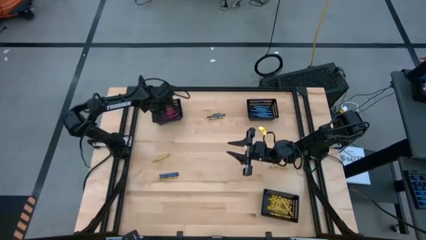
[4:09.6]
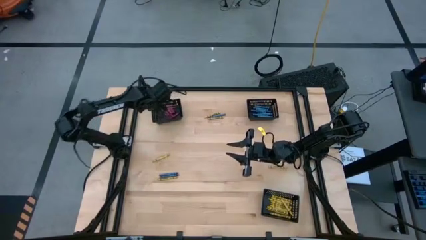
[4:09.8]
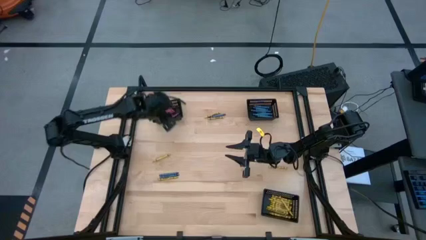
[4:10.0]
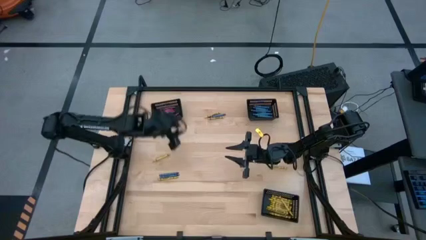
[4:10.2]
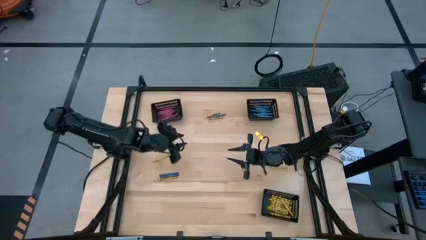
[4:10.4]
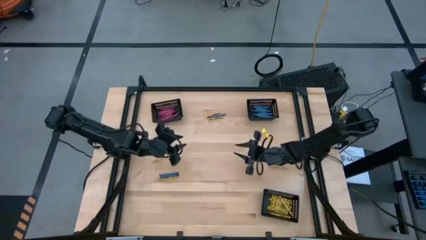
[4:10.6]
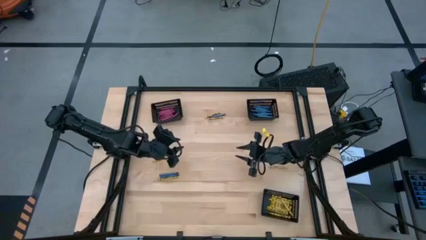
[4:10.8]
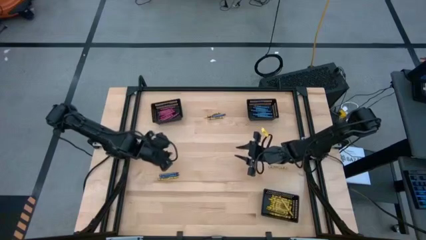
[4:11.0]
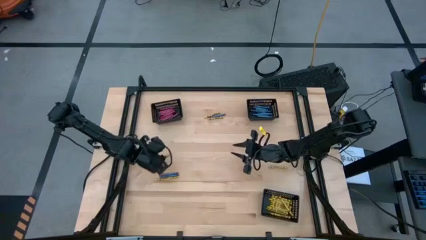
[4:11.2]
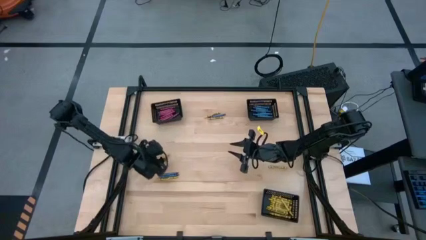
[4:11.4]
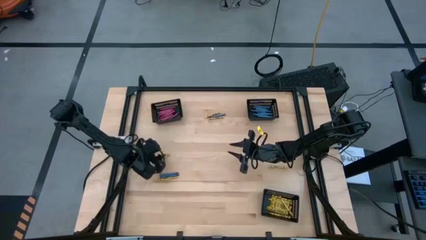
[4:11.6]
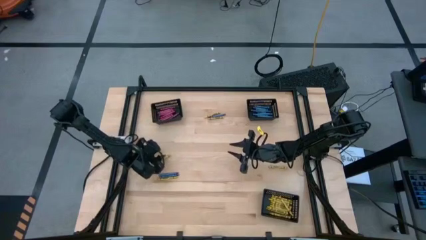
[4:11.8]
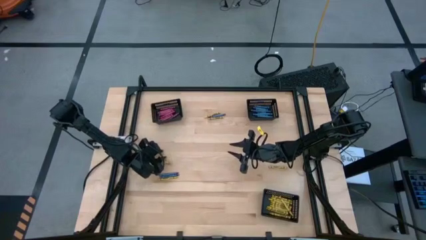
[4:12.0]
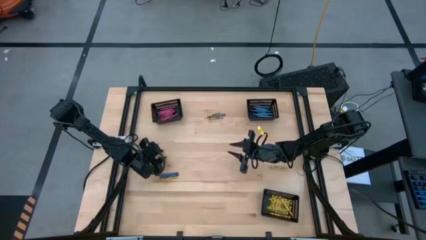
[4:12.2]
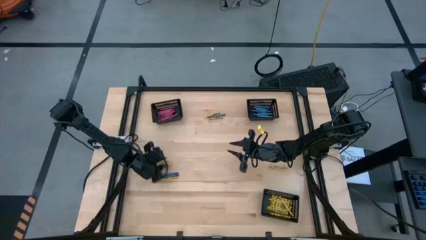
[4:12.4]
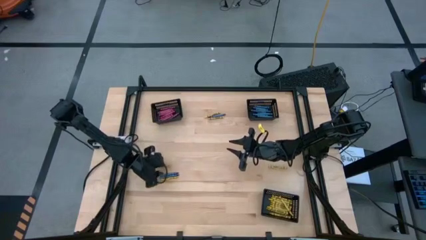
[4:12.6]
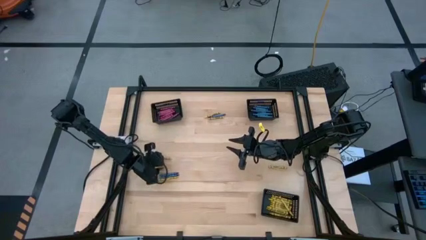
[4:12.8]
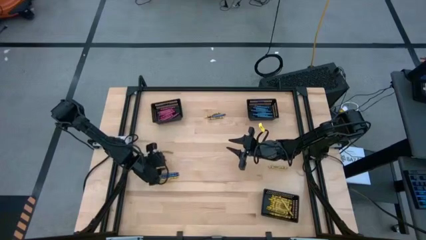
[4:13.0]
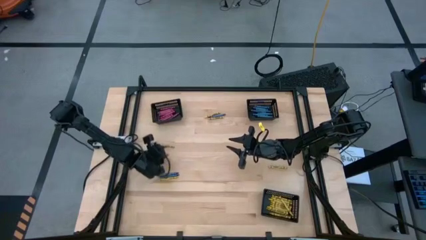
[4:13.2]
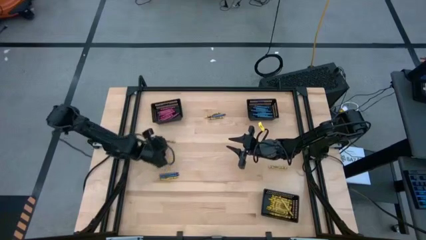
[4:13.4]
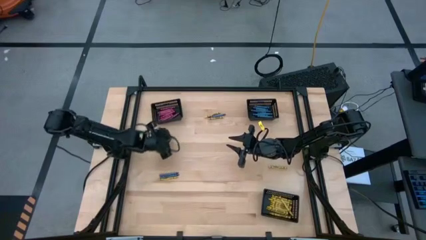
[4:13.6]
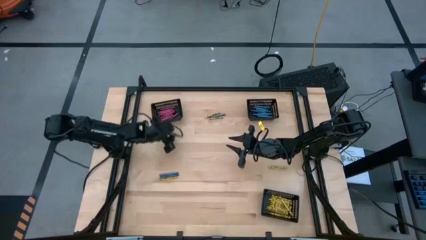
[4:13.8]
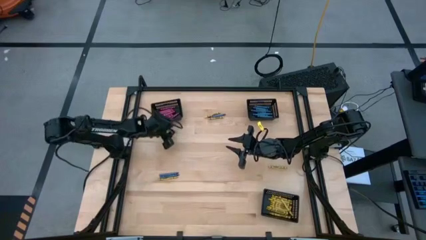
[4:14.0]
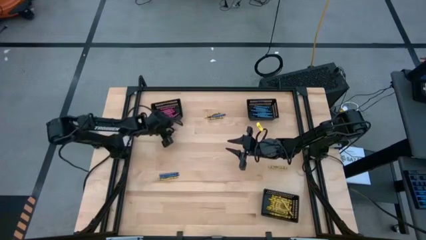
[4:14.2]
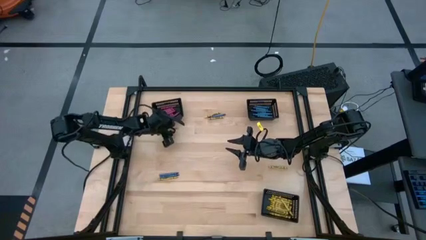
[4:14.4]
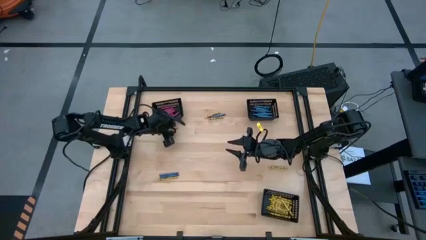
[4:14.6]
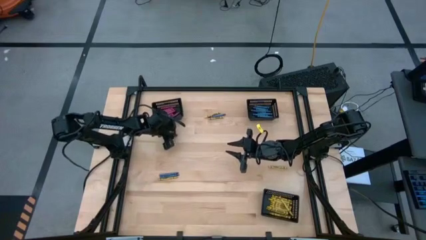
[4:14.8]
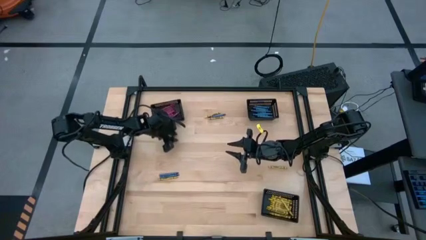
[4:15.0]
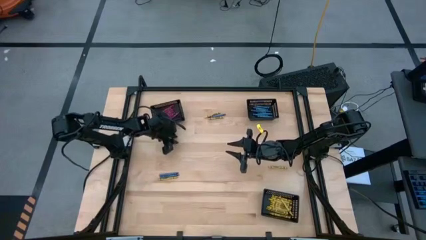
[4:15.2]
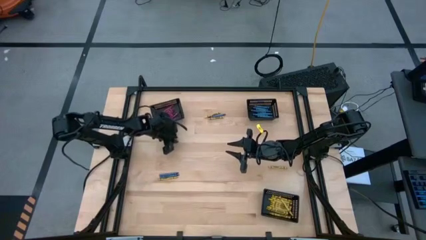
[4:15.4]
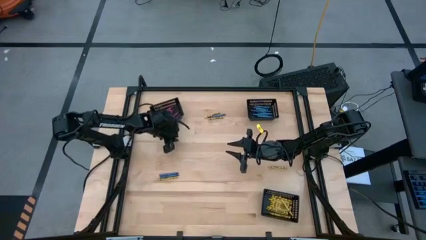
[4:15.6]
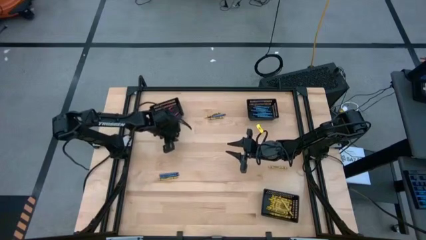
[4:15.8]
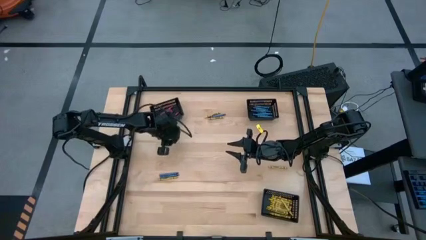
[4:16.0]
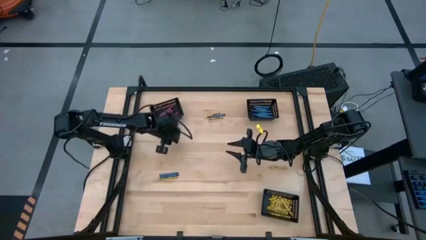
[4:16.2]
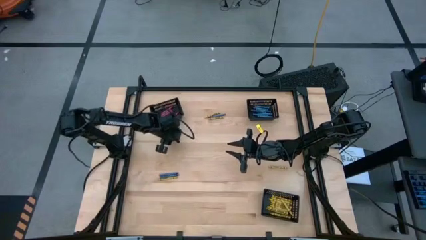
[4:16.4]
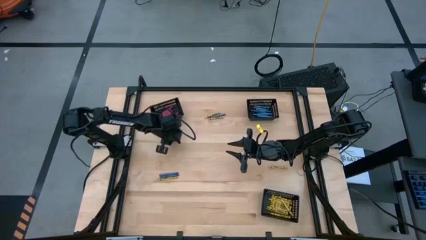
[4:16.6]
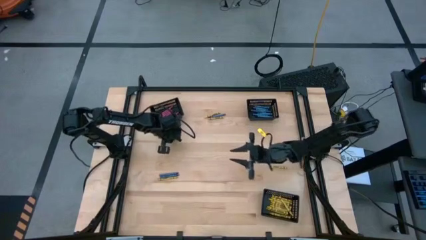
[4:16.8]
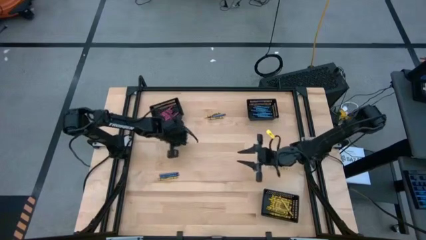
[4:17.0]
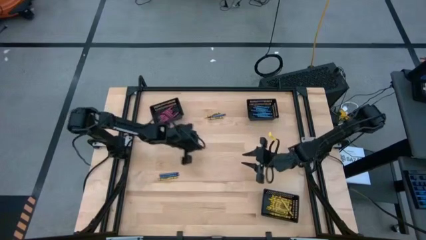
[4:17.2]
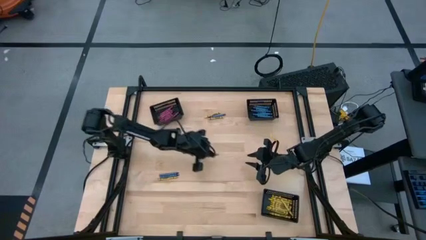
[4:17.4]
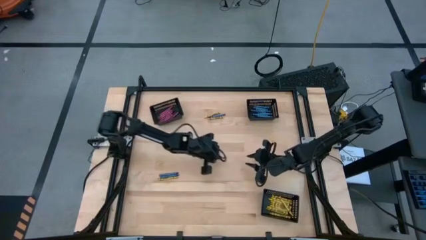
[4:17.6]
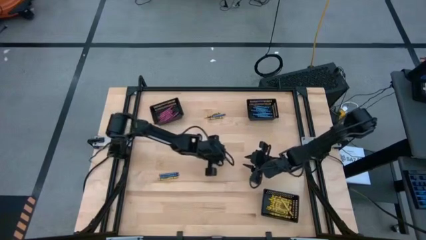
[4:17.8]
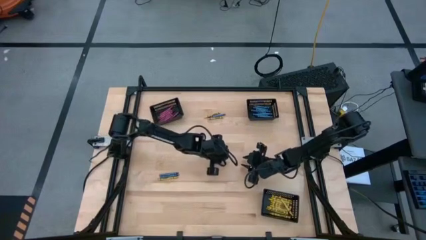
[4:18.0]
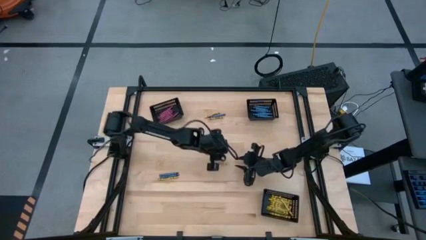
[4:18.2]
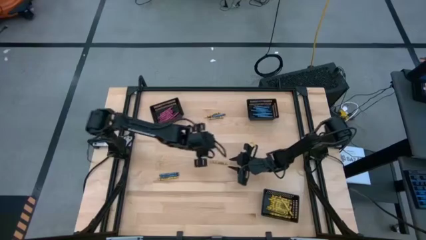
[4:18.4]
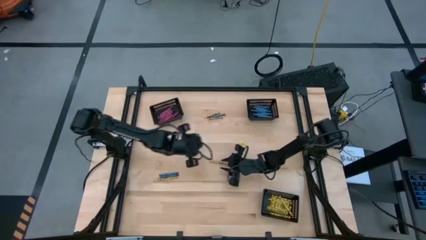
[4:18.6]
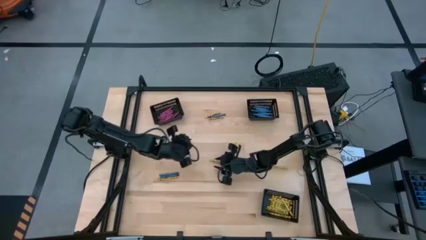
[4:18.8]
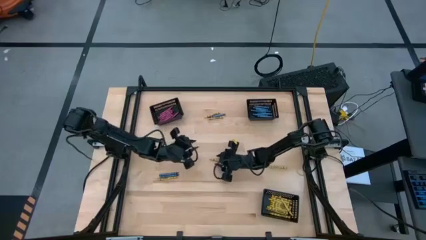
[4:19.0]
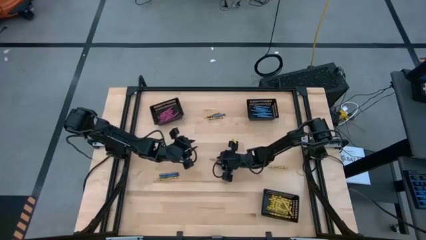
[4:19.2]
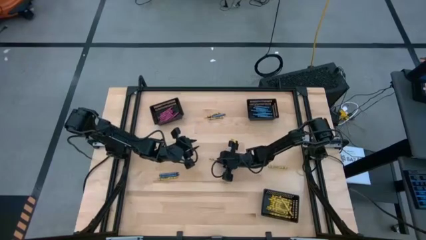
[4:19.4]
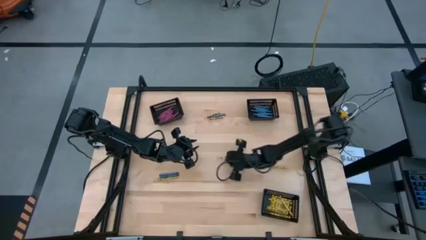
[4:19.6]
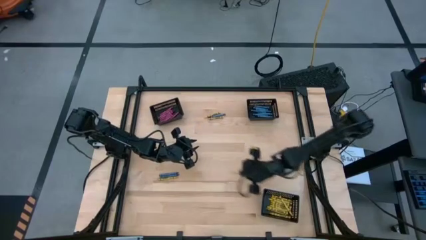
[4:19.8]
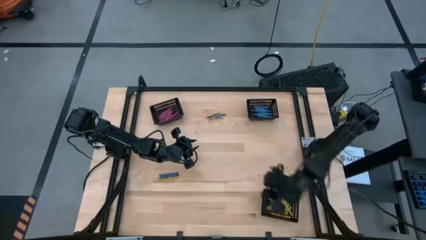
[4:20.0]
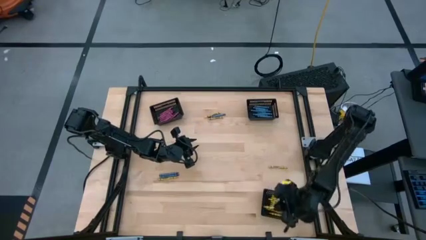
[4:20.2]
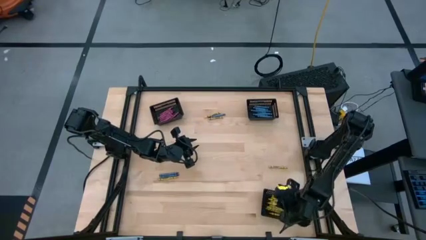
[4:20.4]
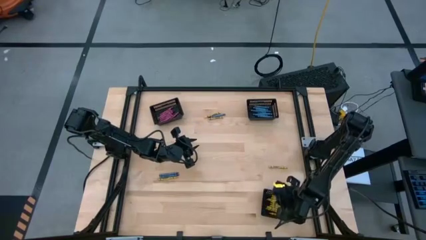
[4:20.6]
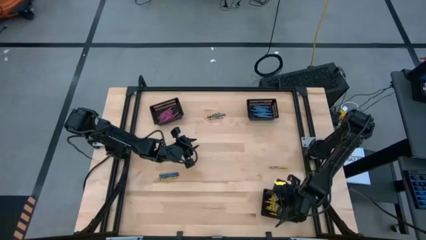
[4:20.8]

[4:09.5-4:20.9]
Task: Sort crayons
Put the yellow crayon into the bottom black bin

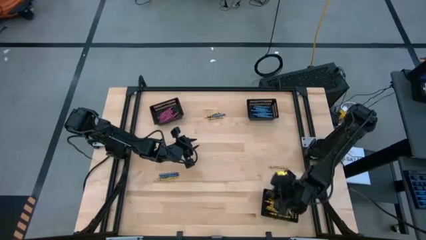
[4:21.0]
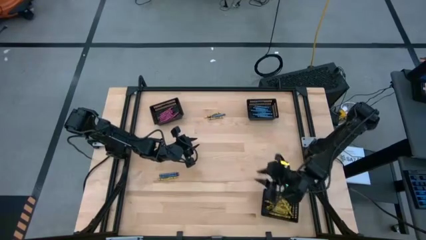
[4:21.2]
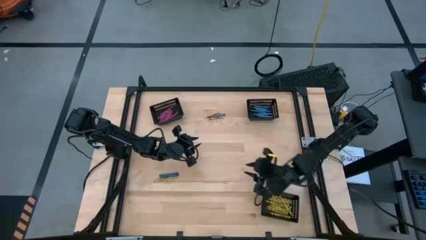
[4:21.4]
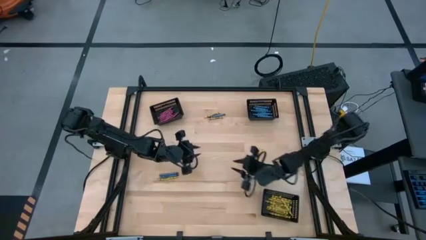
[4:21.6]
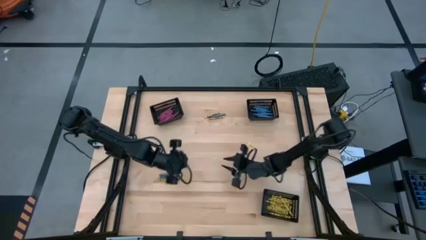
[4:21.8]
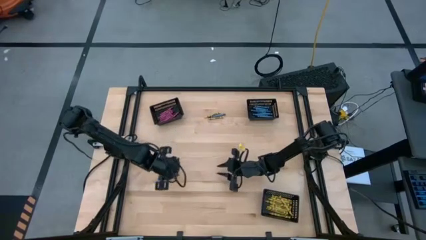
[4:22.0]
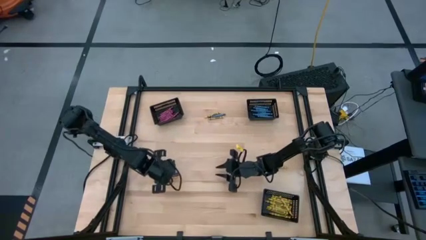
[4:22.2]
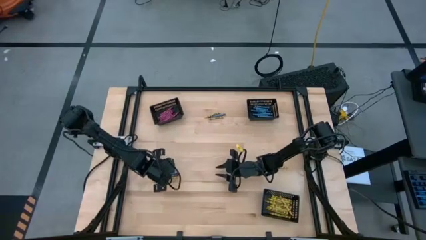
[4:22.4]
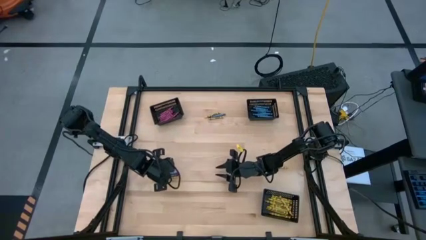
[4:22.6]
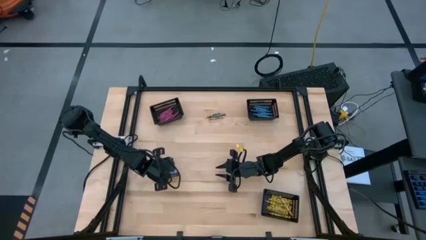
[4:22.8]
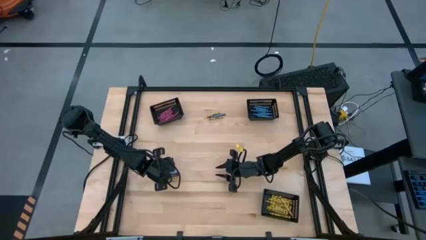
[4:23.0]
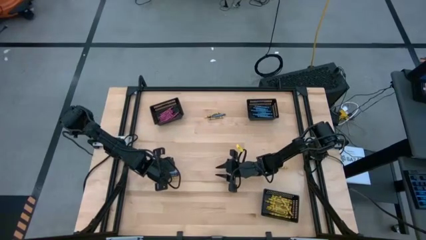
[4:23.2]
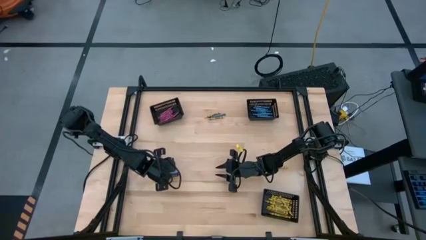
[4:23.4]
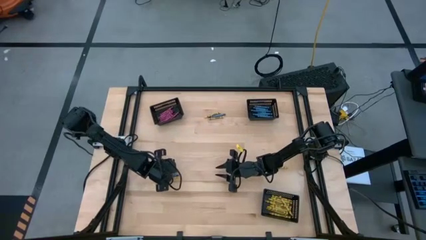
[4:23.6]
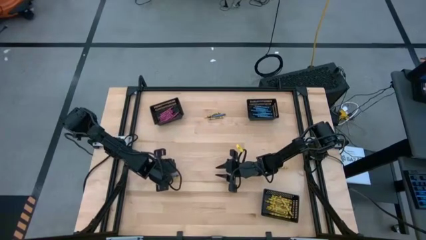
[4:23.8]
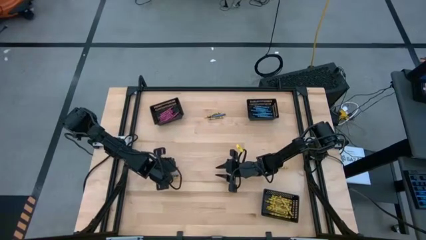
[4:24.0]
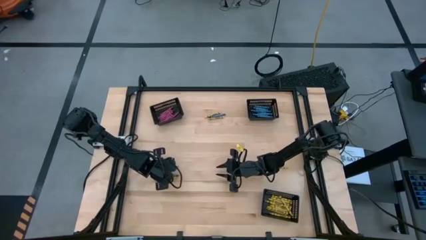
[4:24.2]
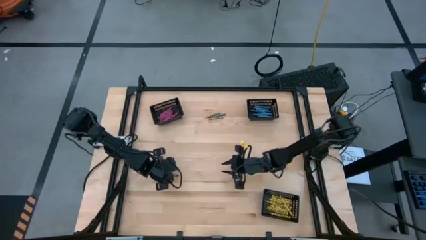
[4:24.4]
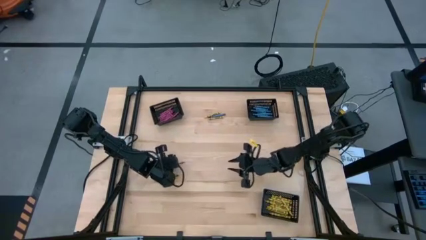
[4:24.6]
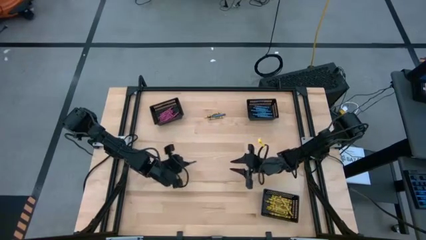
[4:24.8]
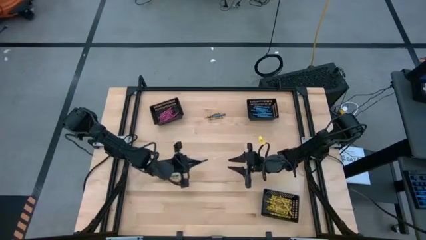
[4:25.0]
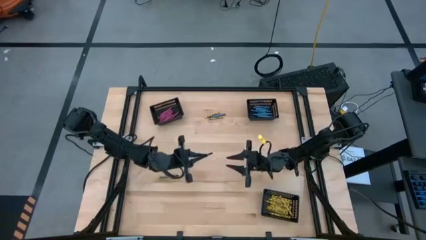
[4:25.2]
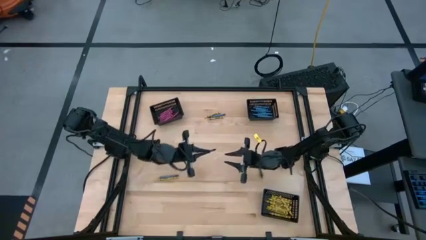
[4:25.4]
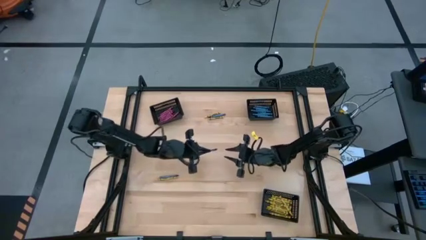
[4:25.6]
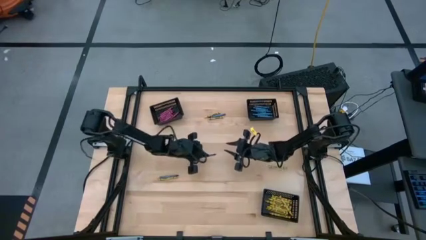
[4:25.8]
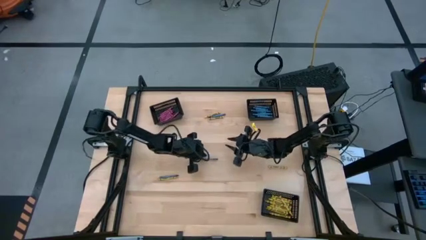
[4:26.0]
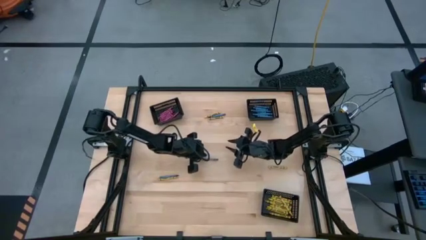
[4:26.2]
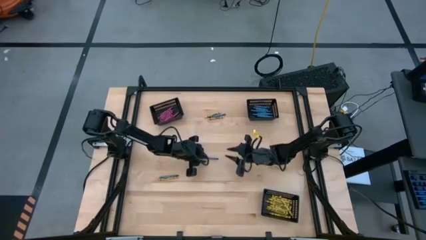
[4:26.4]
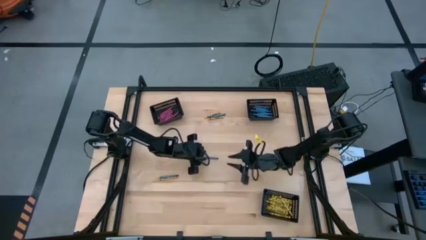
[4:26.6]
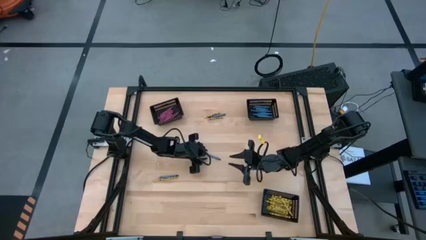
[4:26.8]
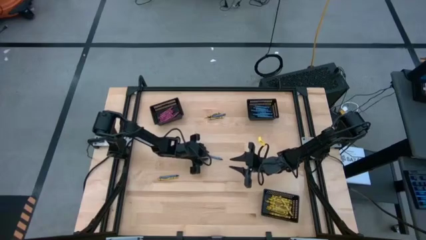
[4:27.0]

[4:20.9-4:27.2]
Put the blue crayon into the top right black bin
